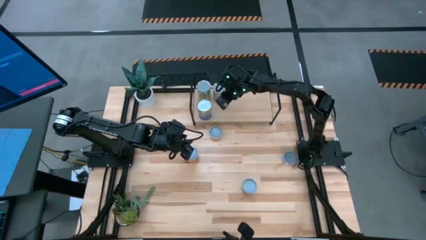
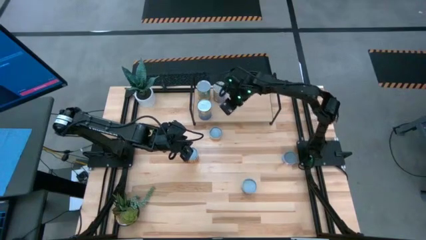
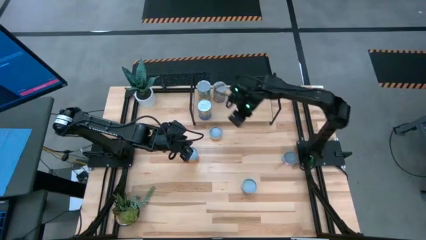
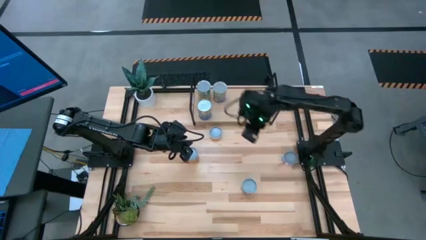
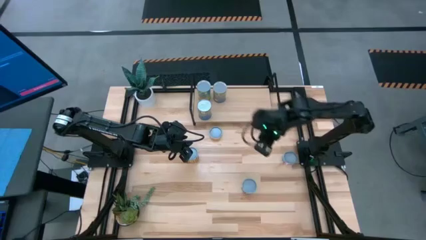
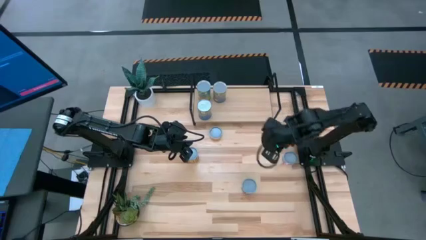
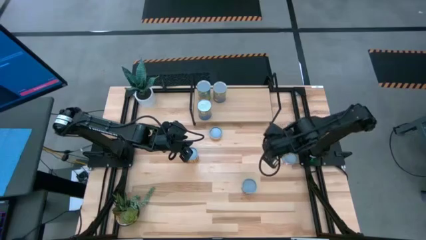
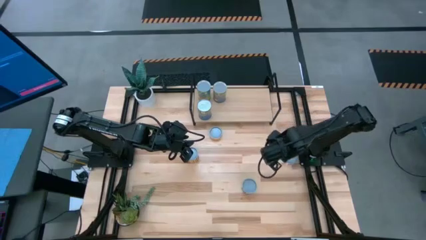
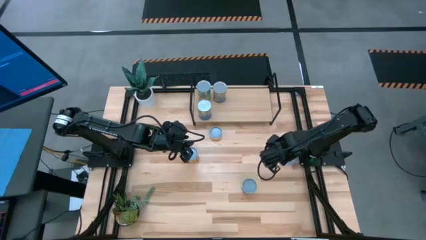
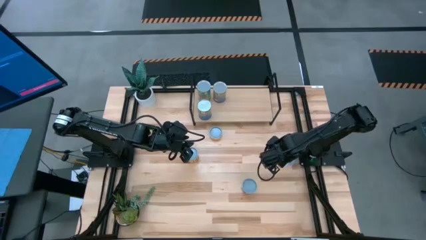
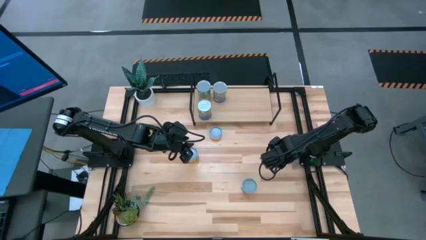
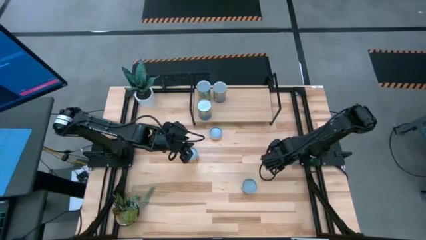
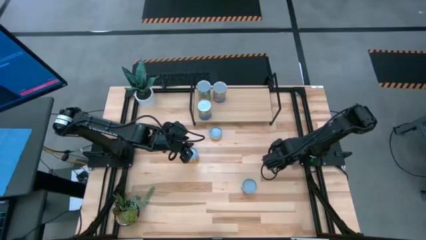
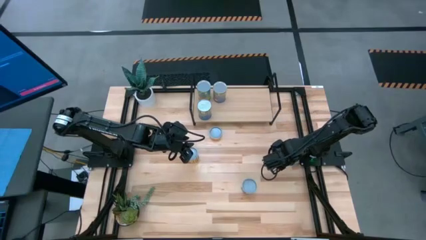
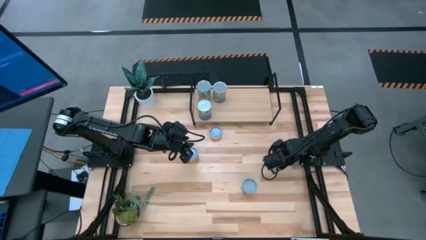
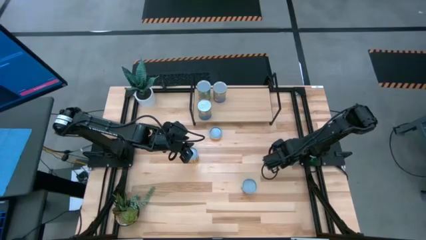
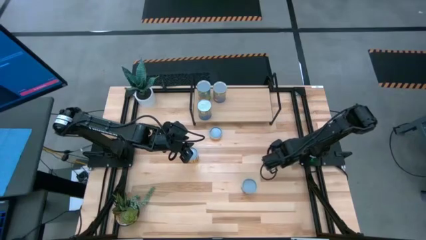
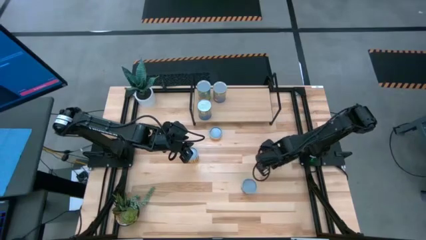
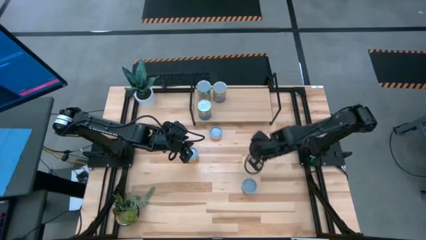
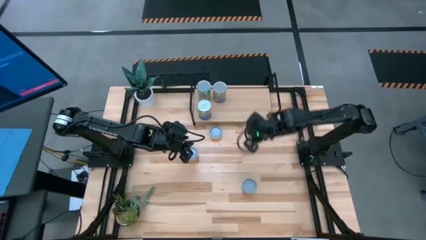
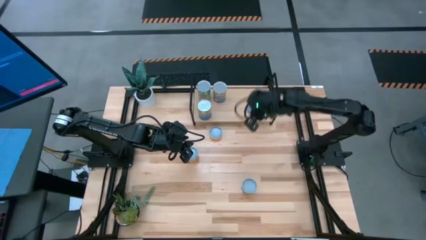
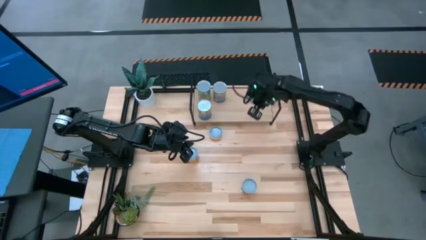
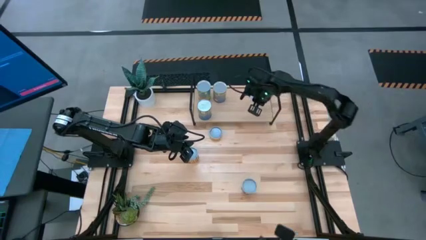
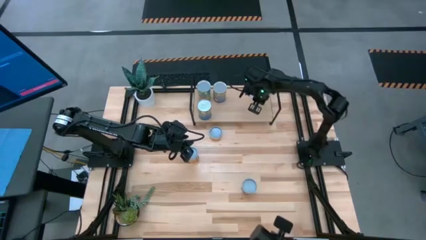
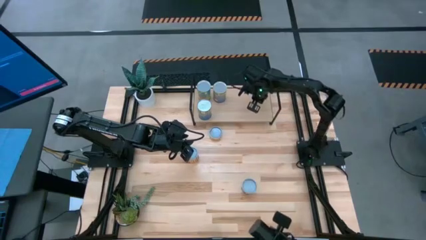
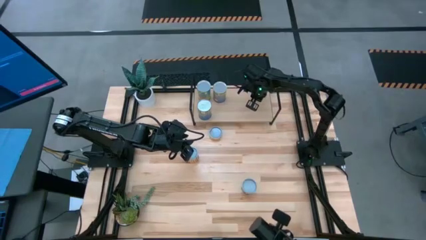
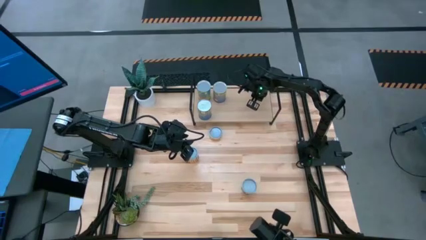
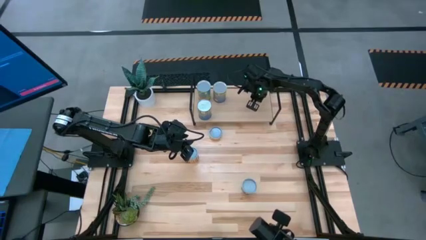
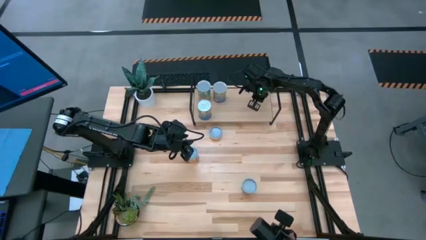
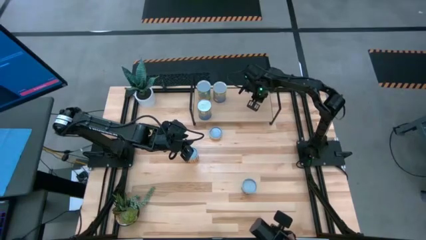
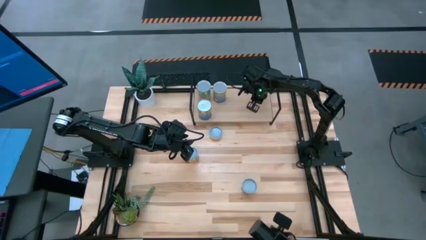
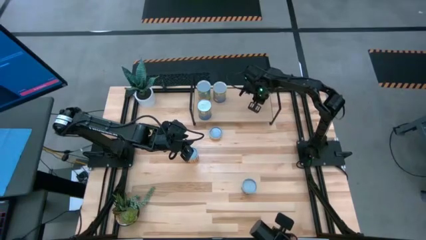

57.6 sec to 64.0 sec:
Task: Pick and place cans onto a shelf
Put the canned salmon on the shelf

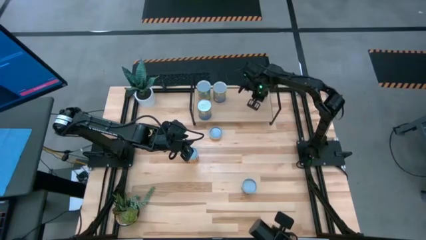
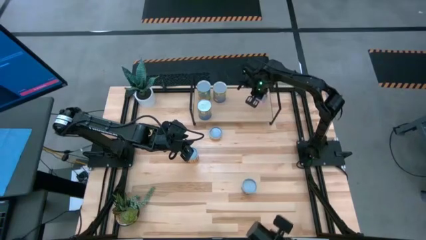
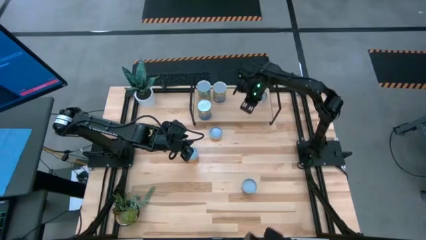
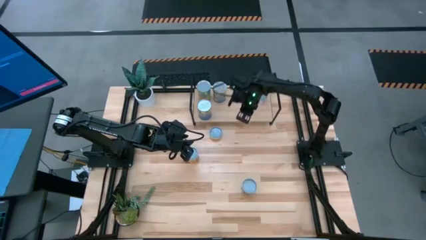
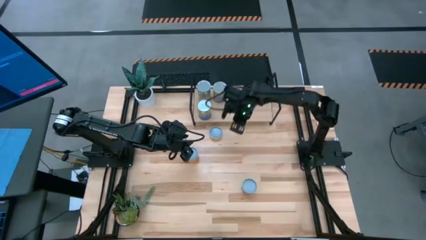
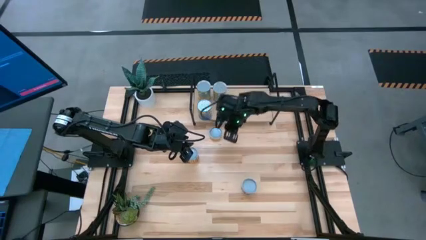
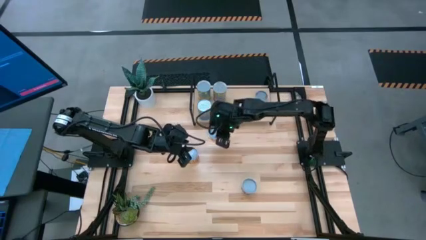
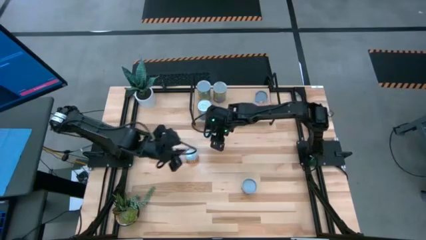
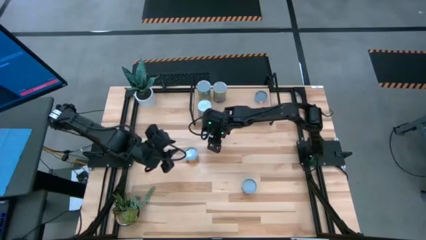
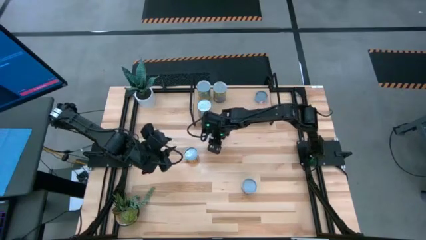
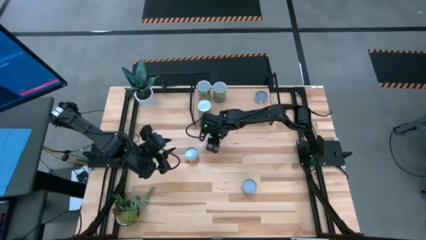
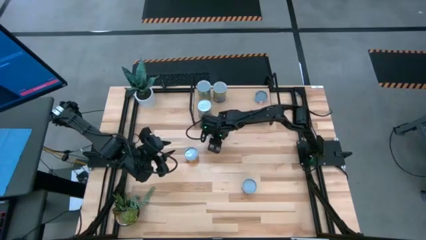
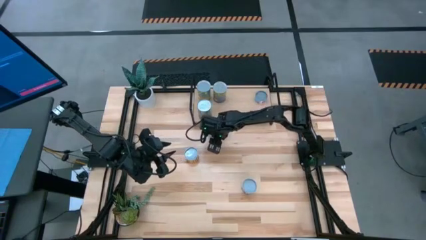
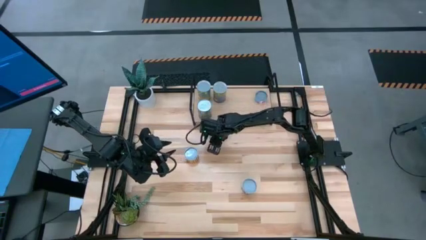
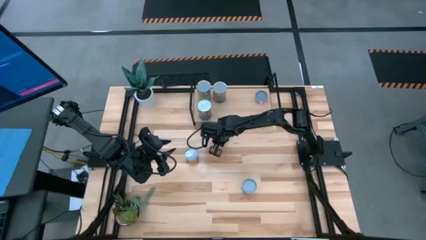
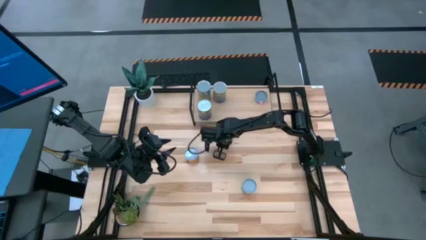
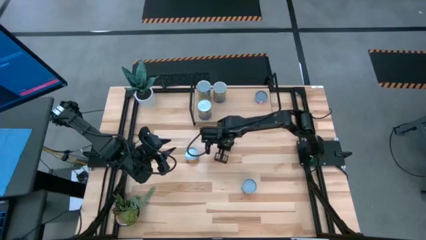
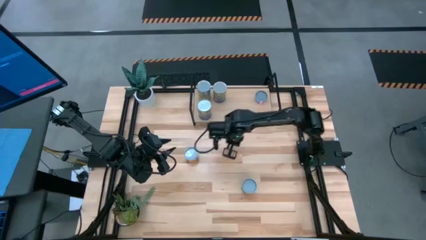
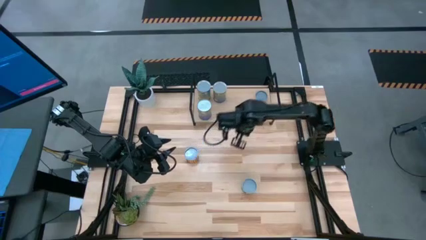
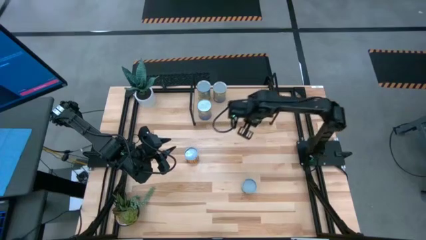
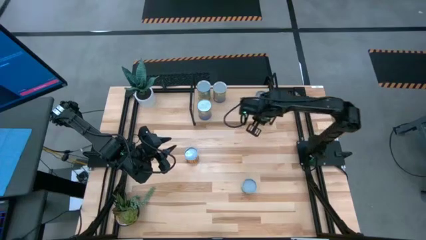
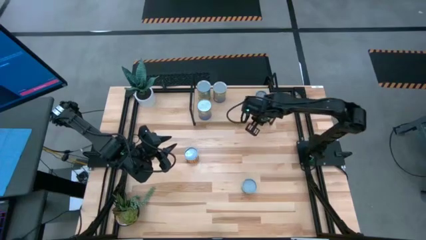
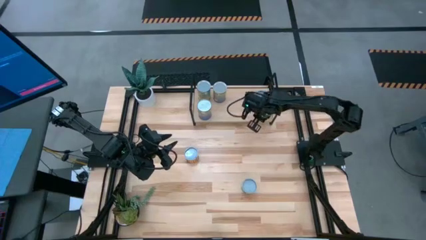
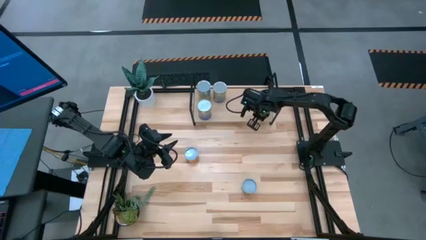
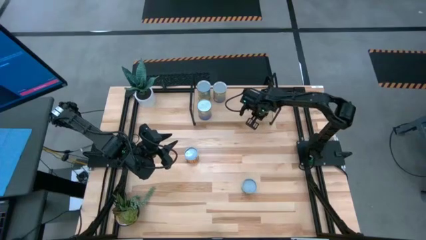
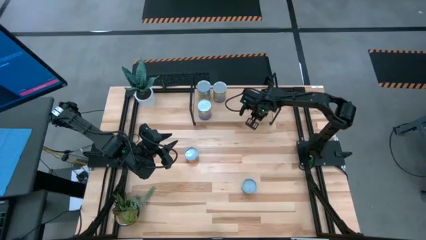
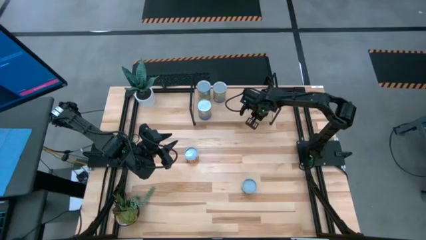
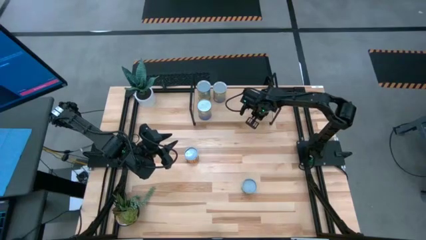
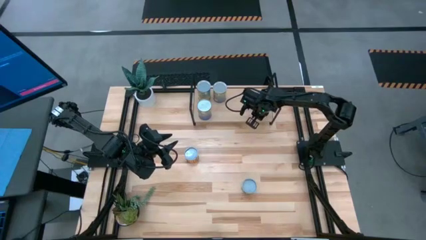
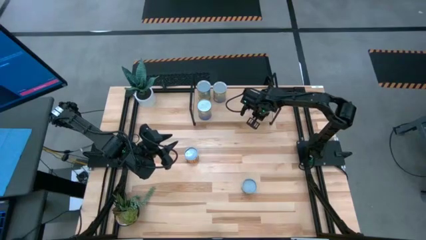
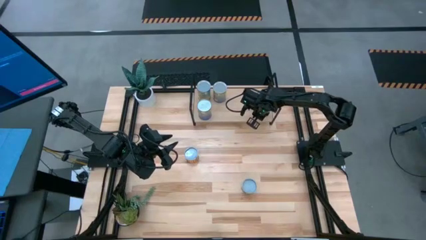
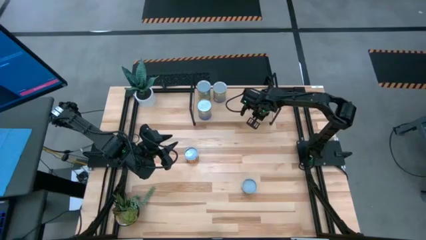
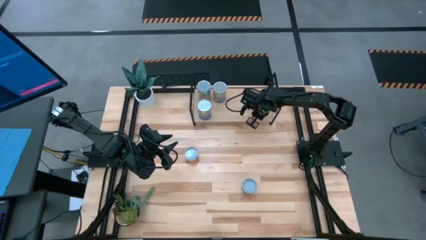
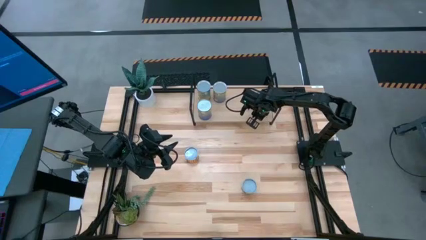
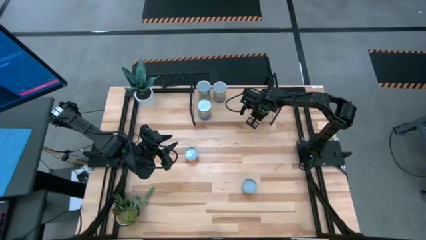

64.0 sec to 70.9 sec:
Put the canned mushrooms on the shelf

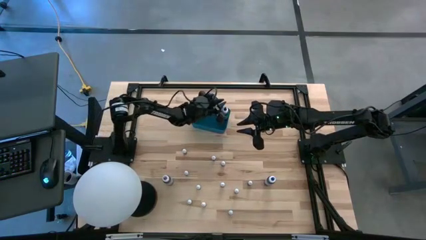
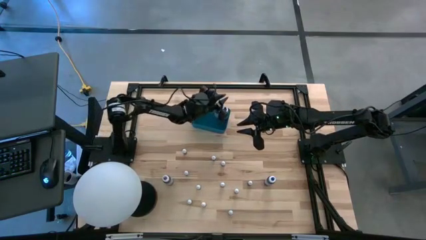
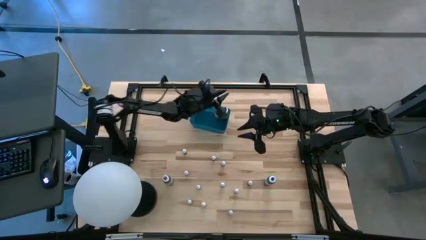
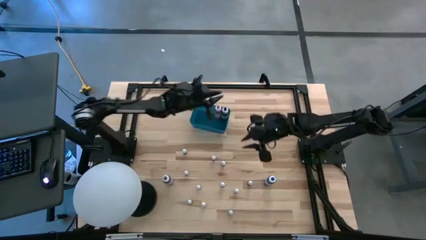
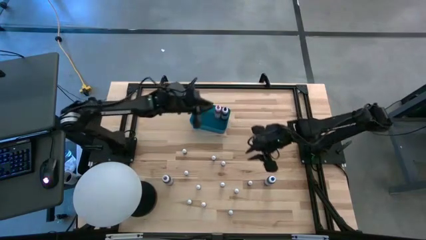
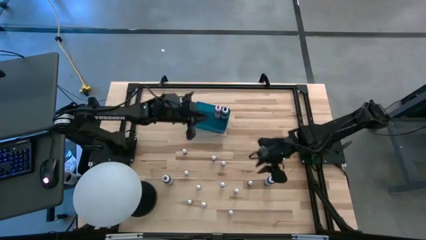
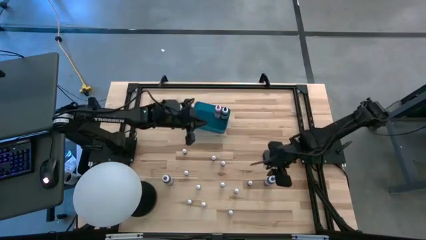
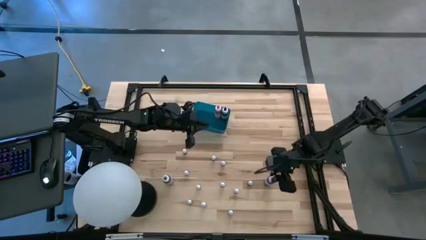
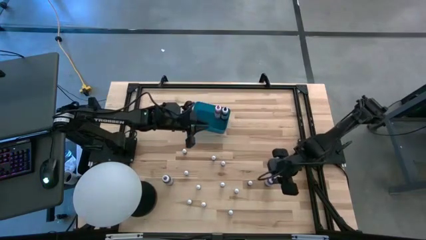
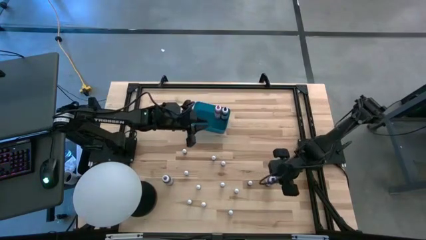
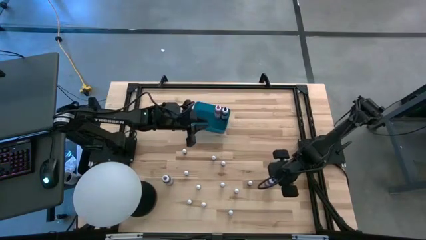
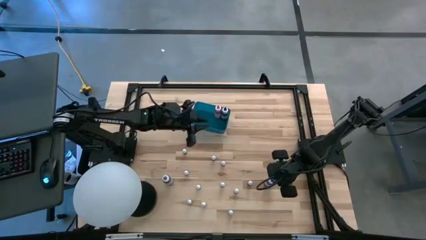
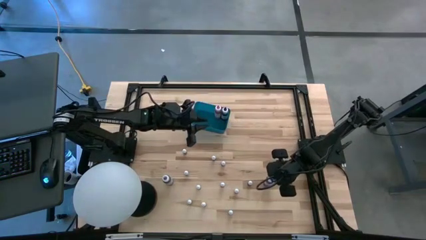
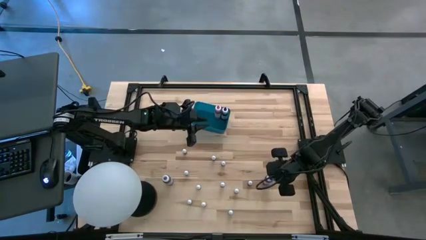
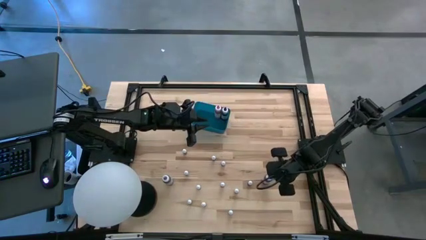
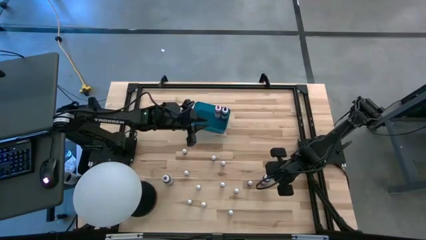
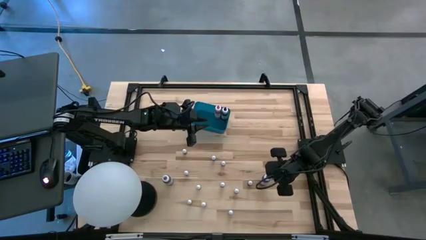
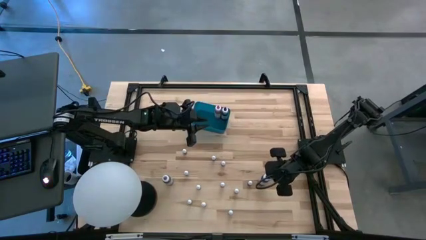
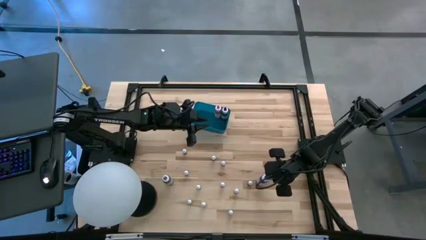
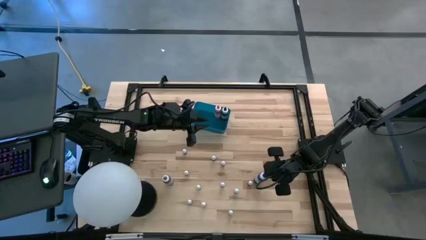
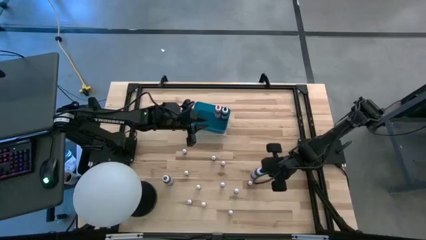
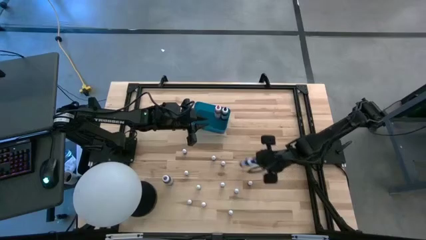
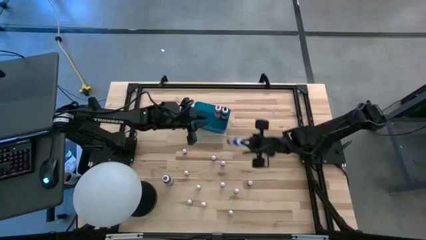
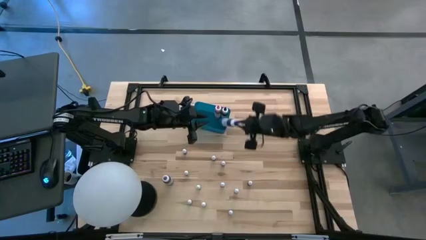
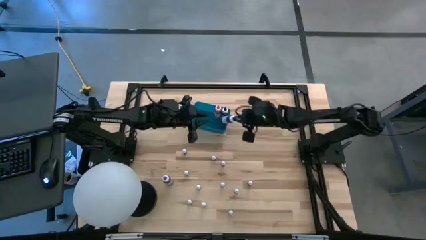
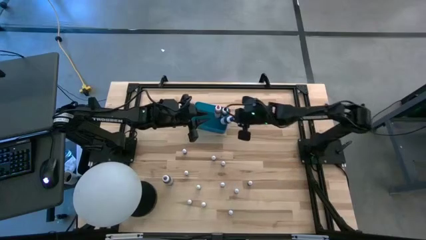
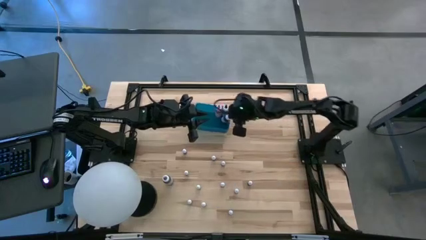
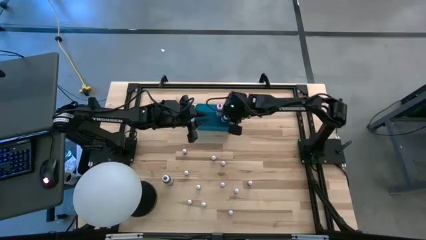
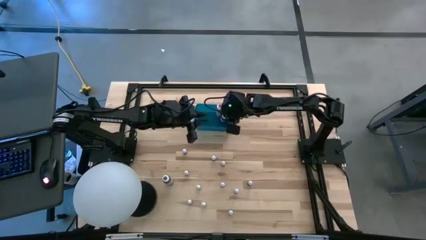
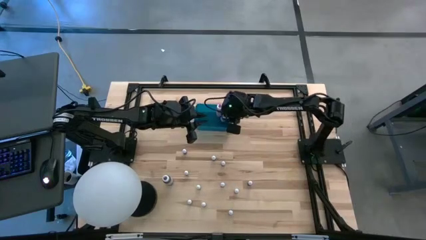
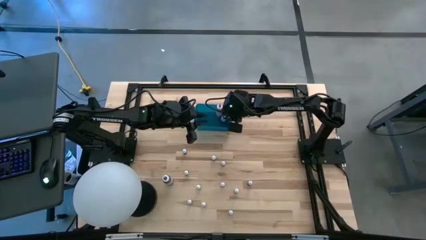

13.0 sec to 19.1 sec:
Task: Pick & Place food coloring
Put the blue food coloring bottle into the blue bin
